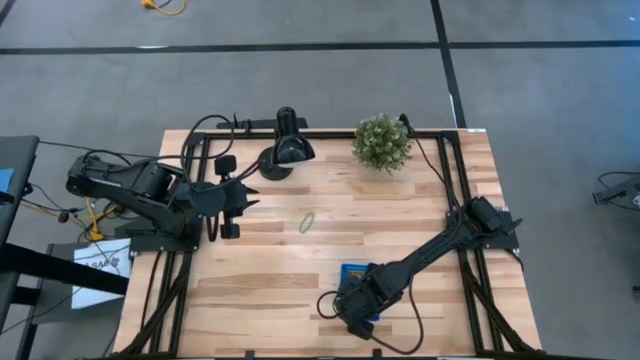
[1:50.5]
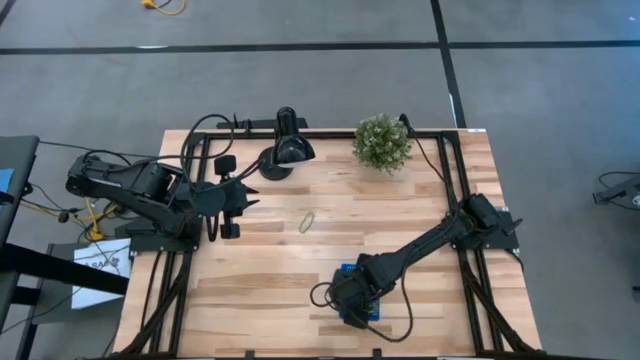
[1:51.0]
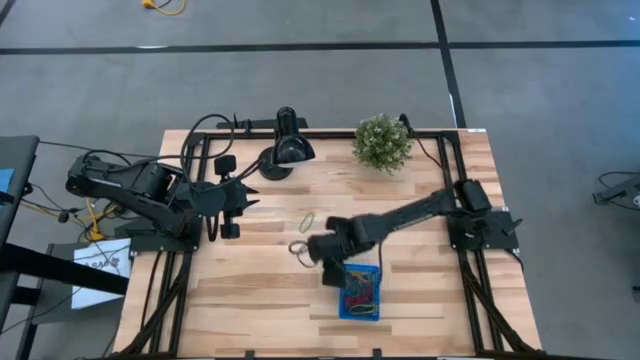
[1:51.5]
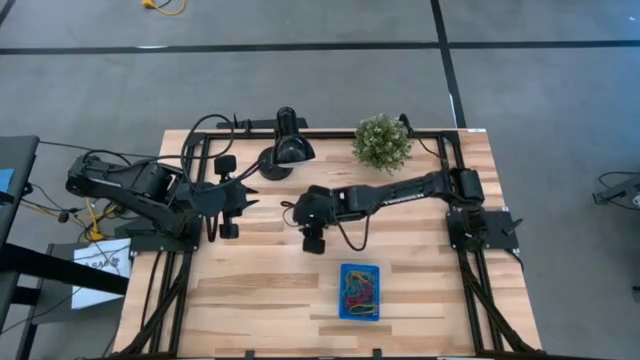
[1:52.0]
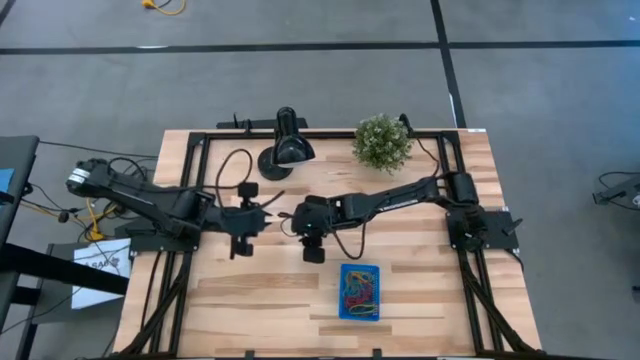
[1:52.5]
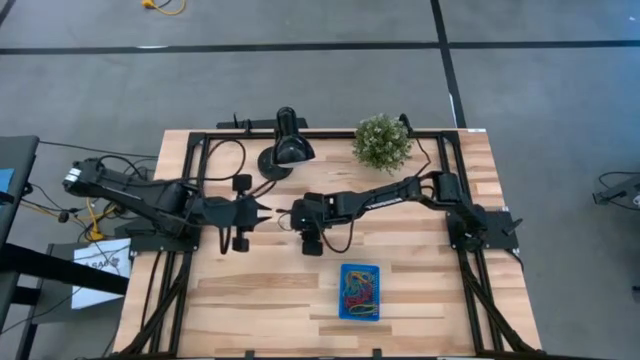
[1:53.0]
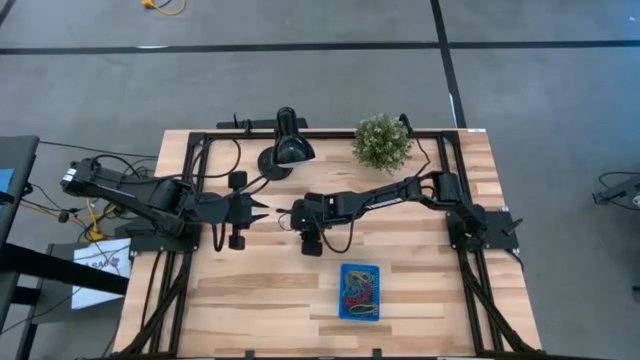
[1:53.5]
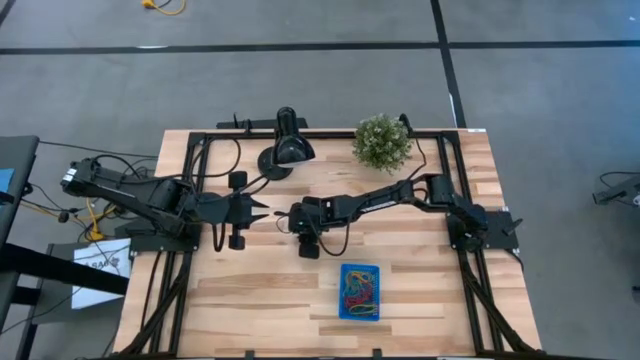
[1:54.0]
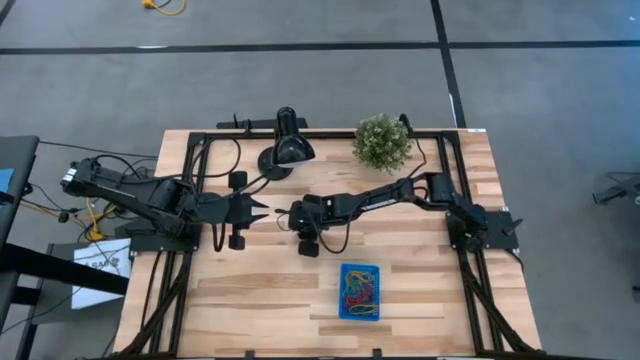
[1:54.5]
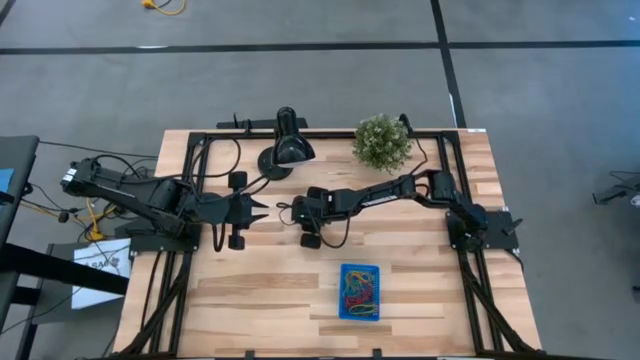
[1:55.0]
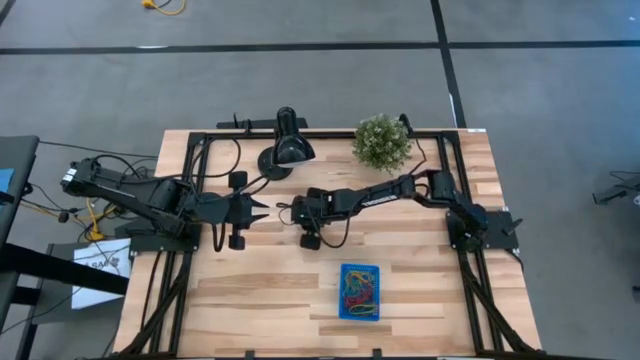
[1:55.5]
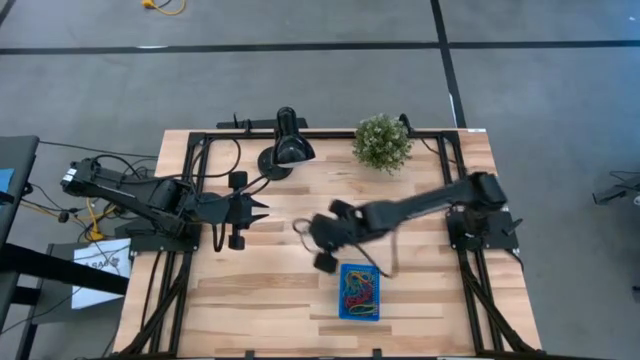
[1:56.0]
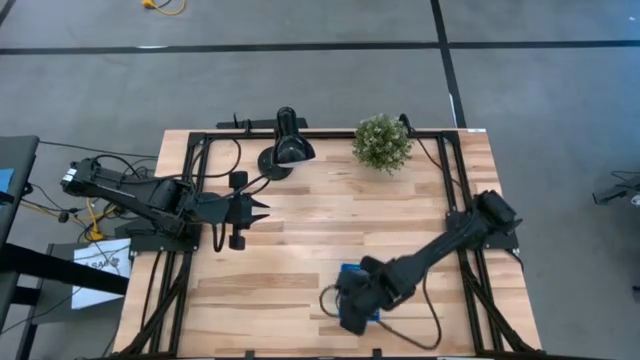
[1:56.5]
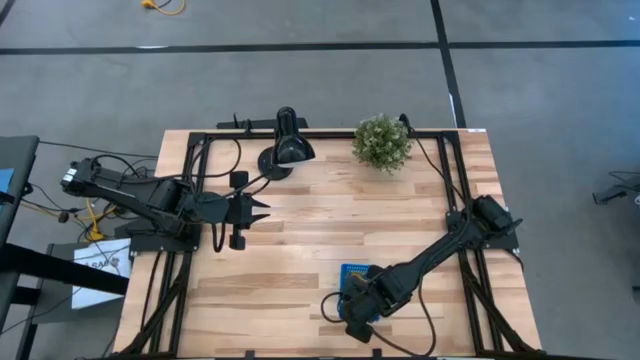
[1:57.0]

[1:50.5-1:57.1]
Task: Pick and place items into bin
Put the green rubber band into the blue bin

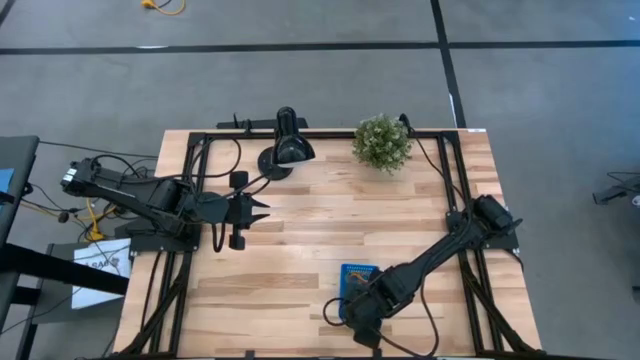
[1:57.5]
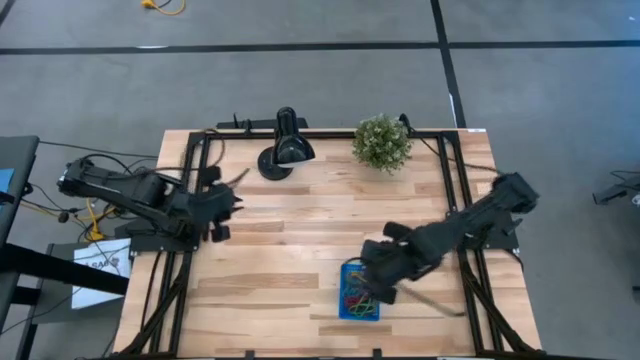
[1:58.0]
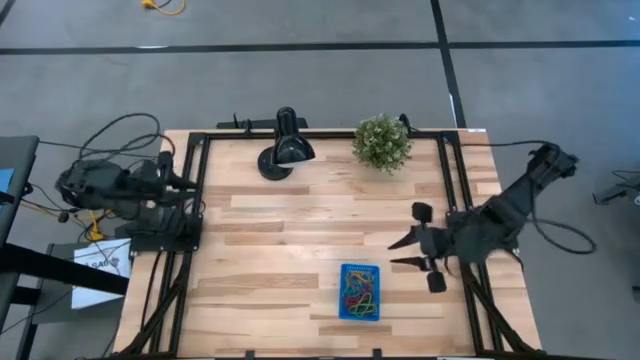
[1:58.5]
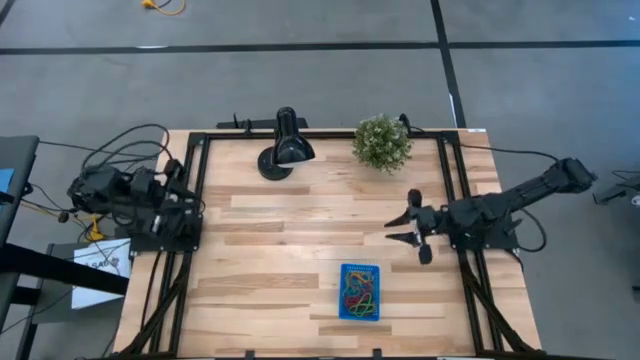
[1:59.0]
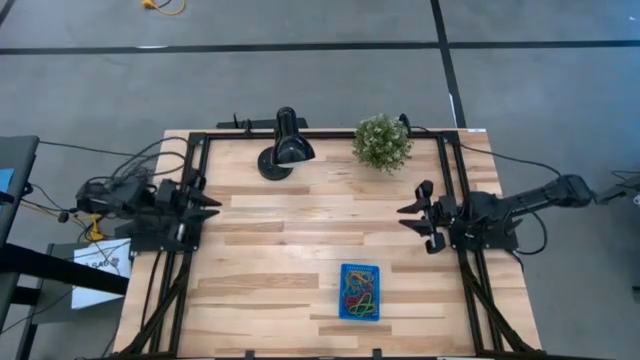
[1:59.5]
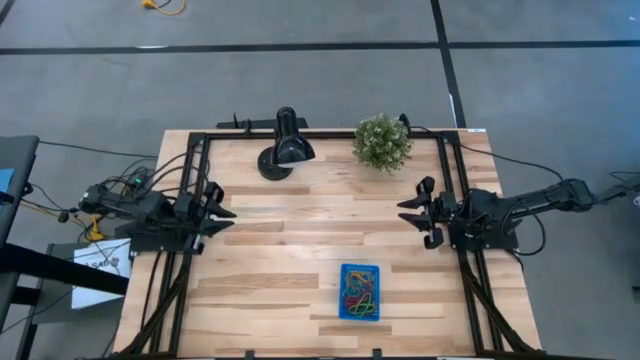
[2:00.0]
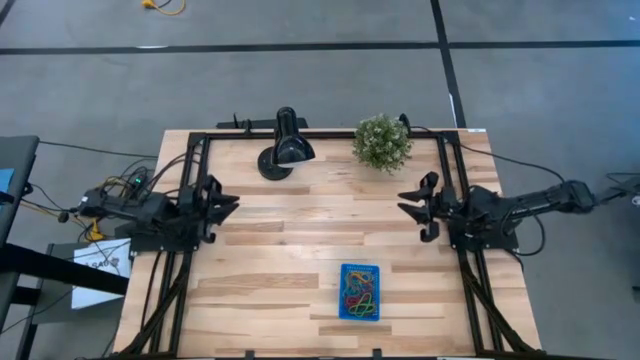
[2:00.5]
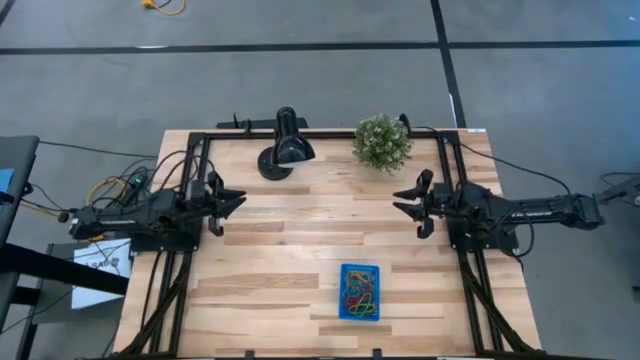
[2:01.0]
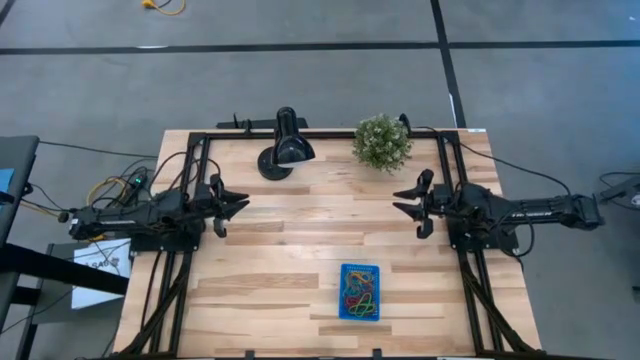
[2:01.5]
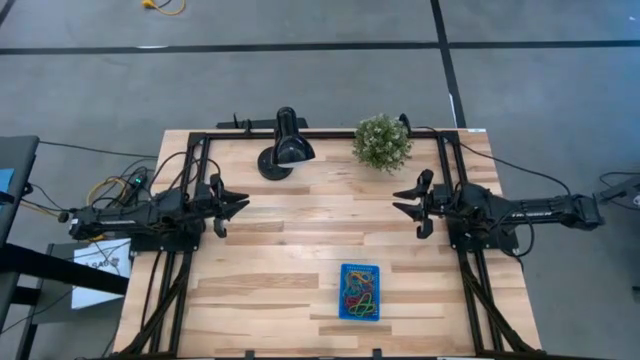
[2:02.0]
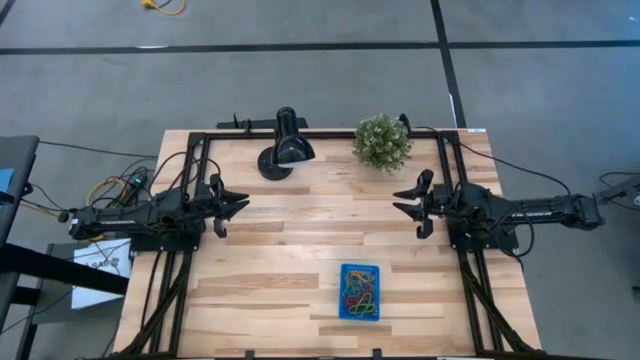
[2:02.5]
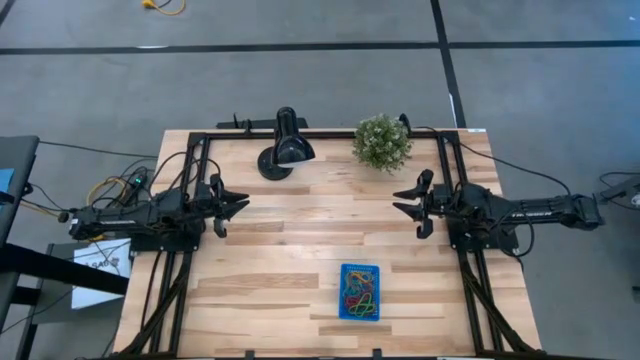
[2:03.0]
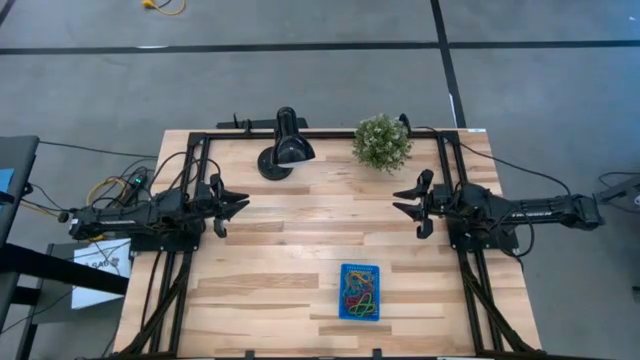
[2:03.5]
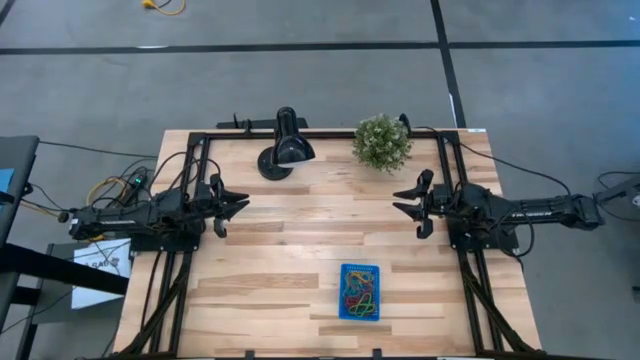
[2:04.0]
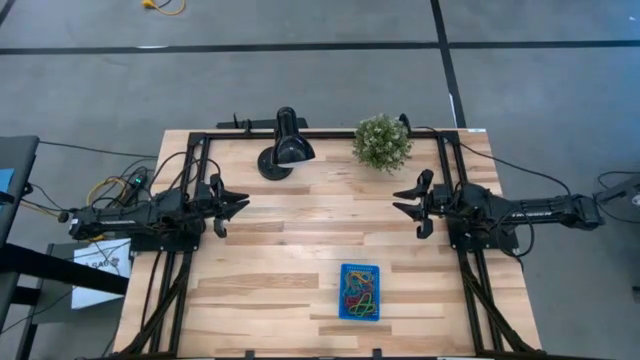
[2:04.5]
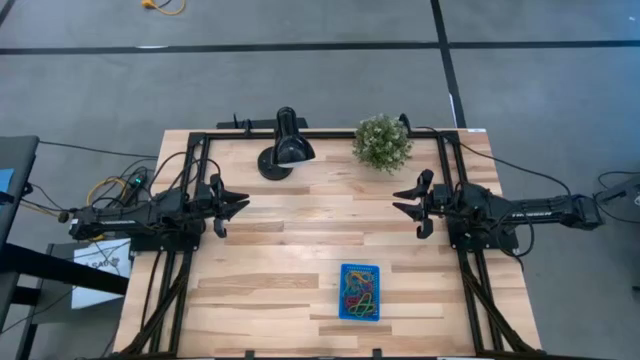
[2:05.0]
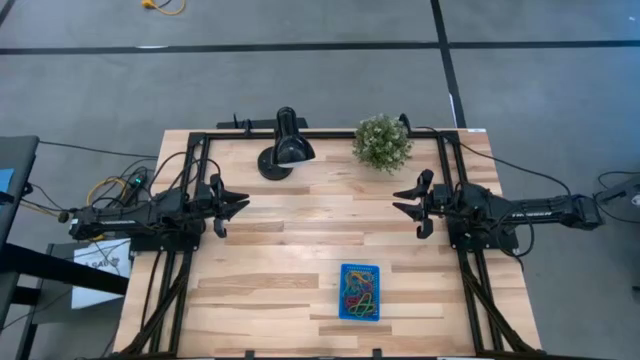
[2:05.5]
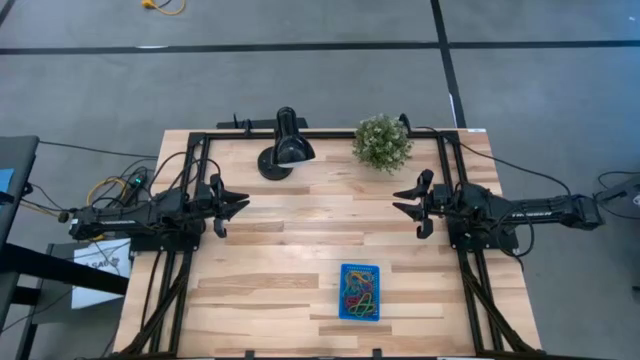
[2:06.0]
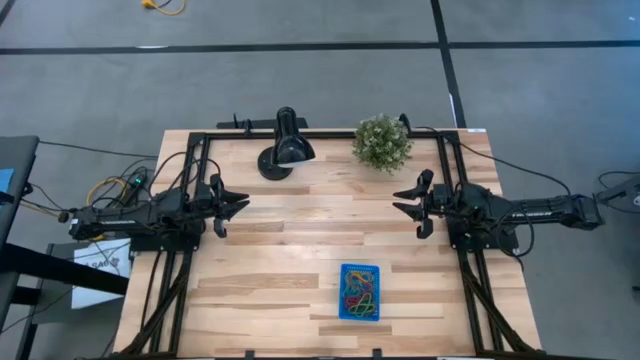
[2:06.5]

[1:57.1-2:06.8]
Return to Home Position

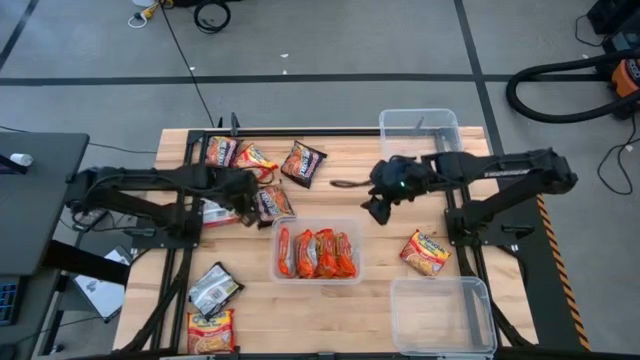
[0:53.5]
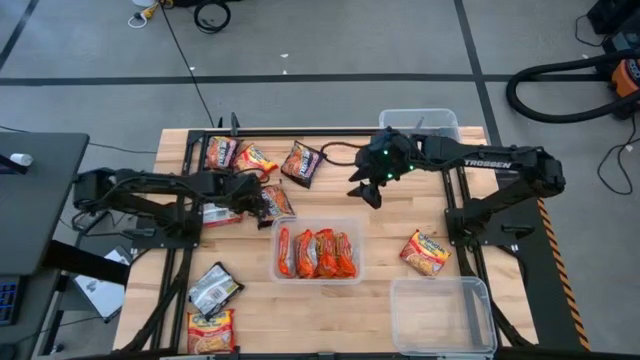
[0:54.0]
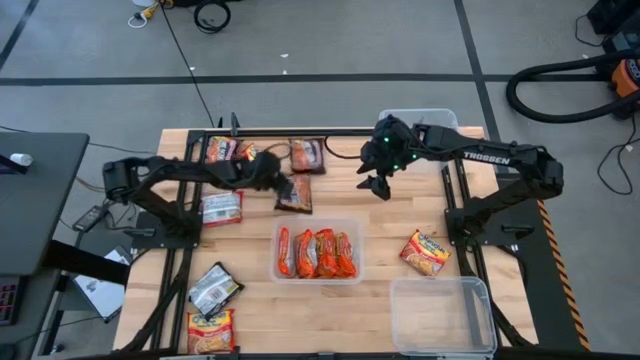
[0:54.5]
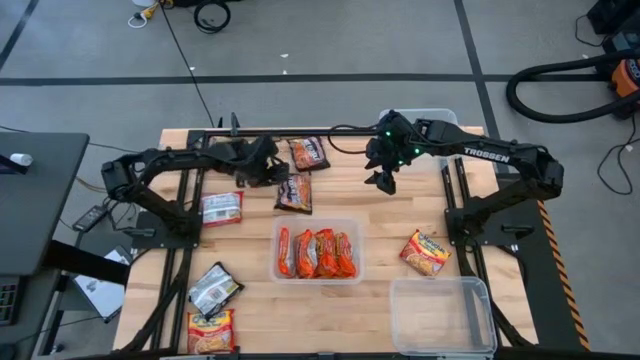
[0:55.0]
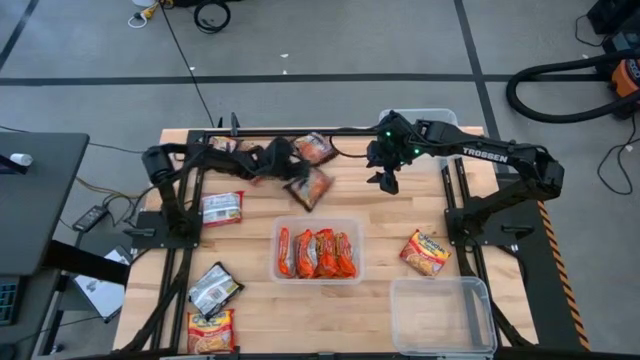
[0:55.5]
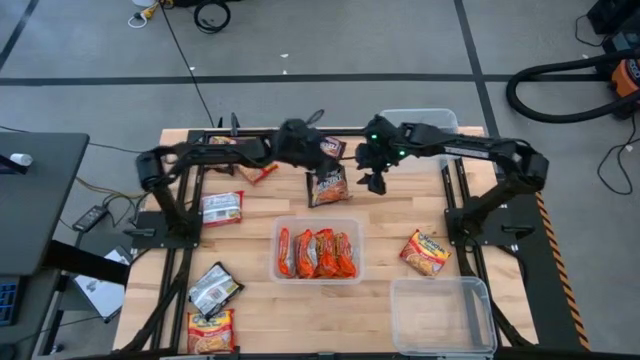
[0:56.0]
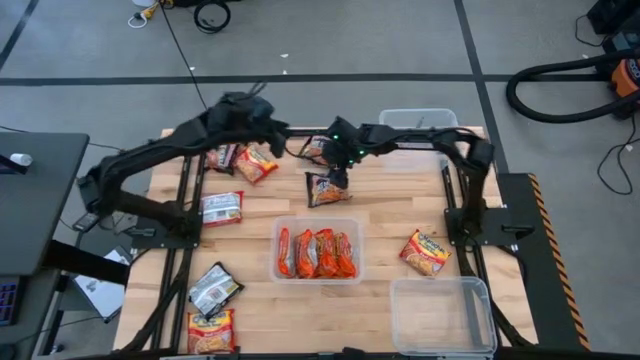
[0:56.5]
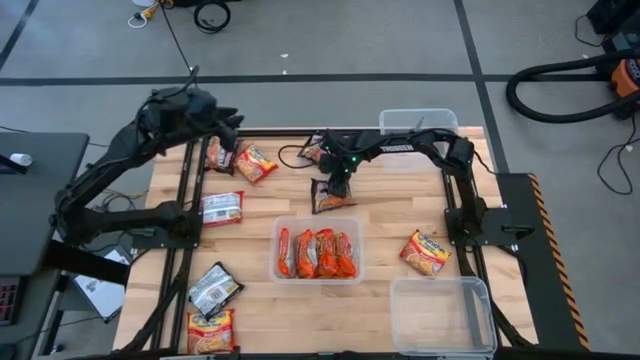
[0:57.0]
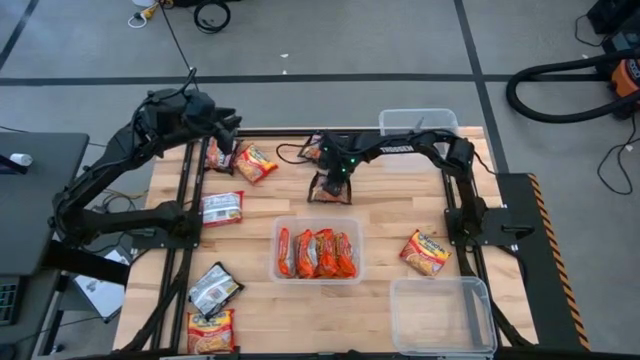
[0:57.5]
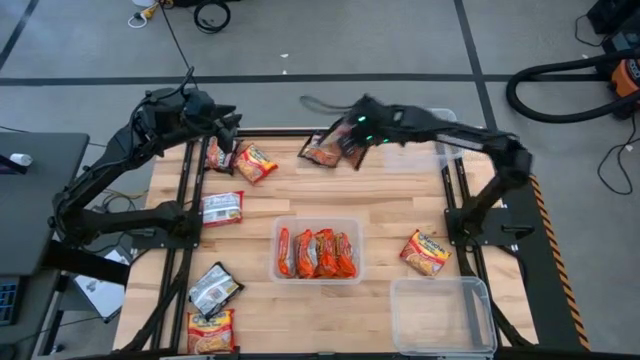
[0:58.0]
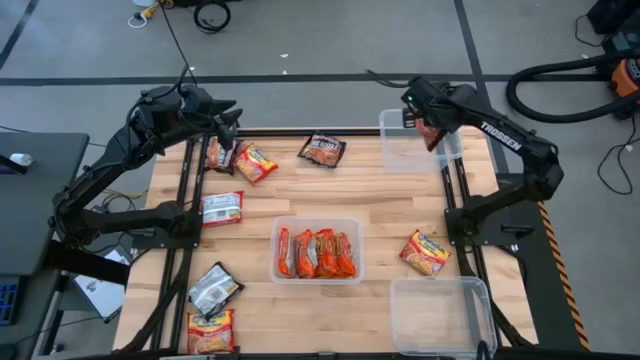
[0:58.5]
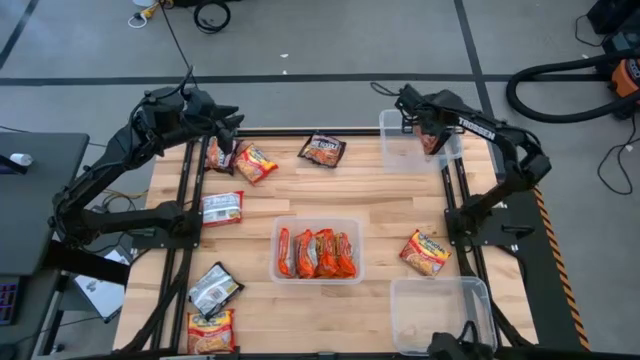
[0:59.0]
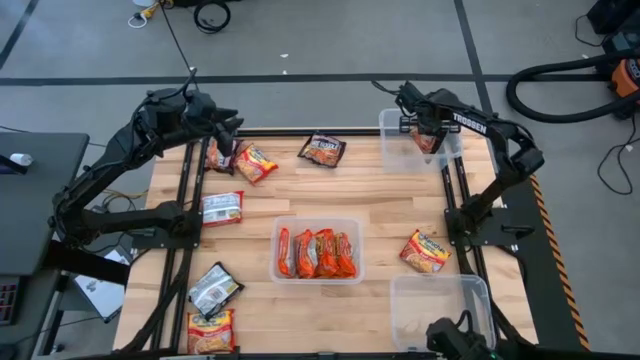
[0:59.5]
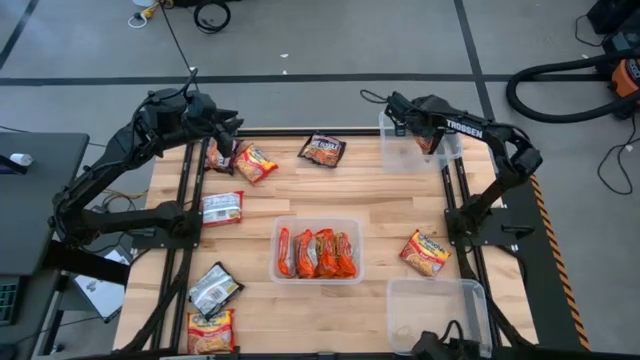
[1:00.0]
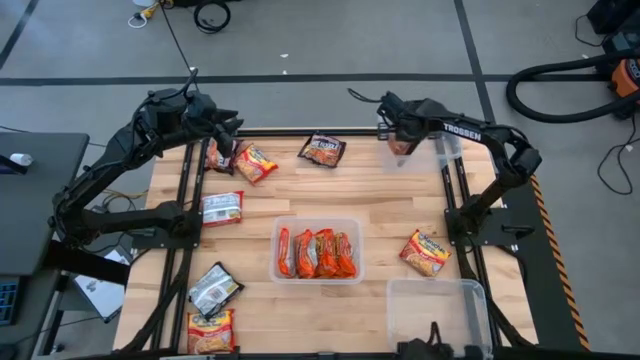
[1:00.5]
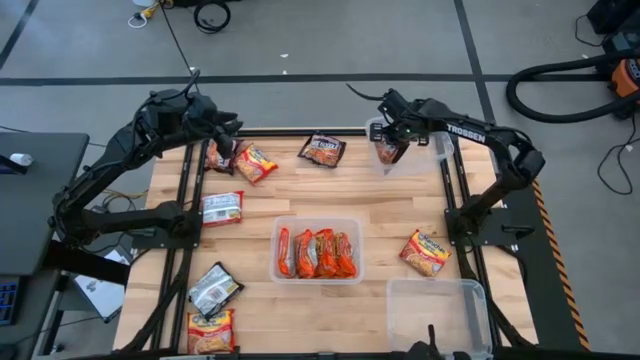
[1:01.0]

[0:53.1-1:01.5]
Task: Sort Maruchan noodles
Put the black noodle pack into the top transparent bin
